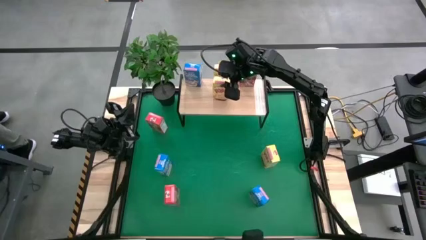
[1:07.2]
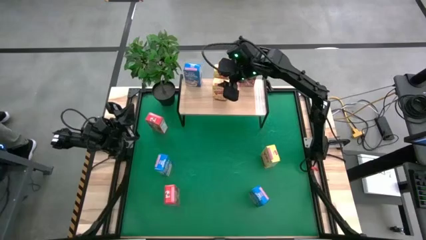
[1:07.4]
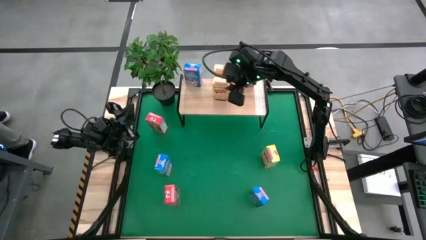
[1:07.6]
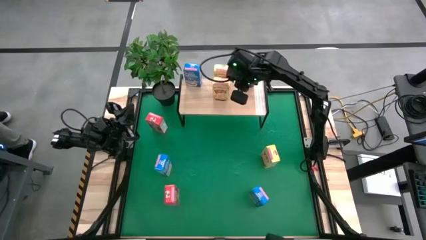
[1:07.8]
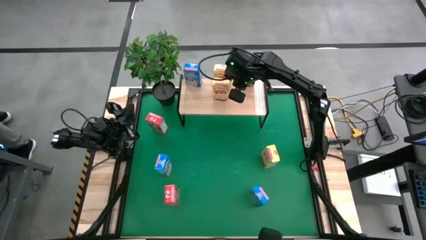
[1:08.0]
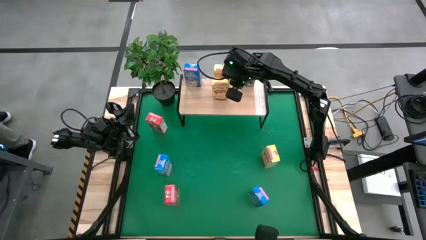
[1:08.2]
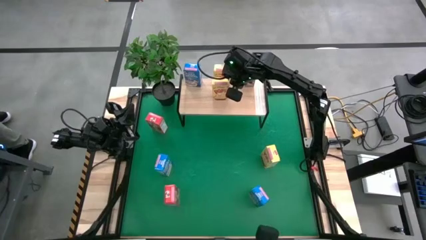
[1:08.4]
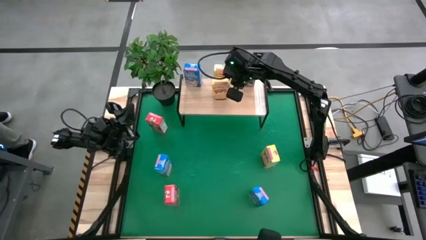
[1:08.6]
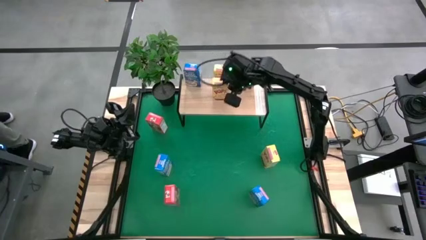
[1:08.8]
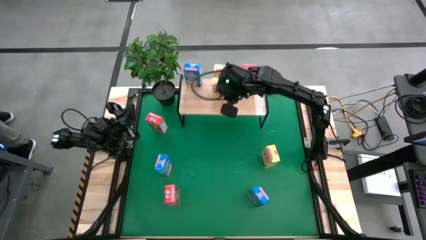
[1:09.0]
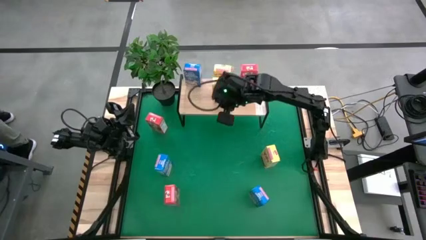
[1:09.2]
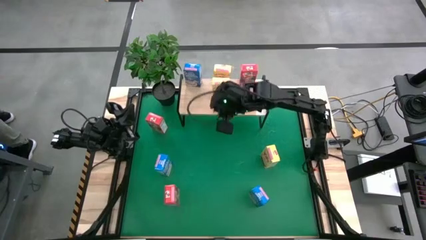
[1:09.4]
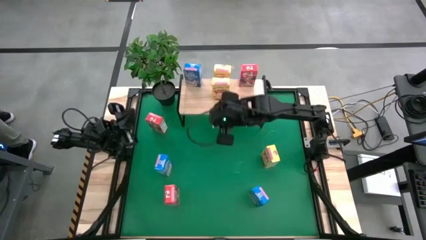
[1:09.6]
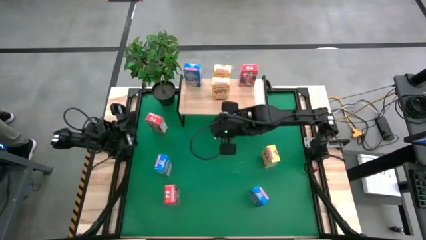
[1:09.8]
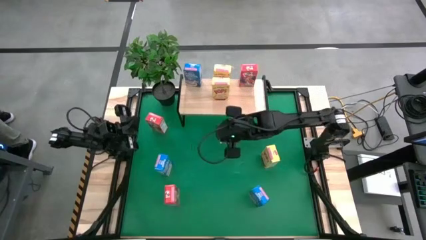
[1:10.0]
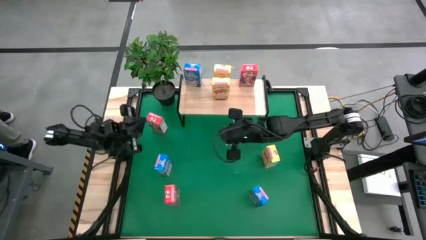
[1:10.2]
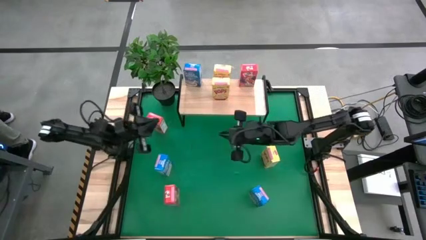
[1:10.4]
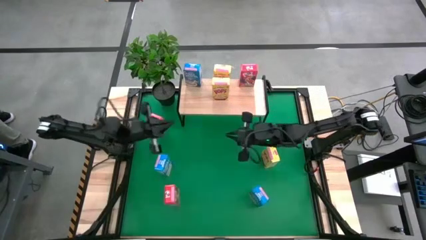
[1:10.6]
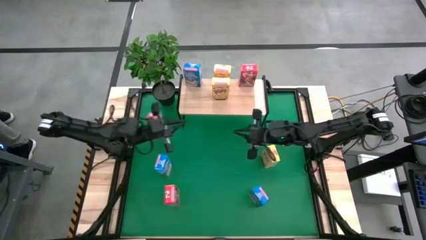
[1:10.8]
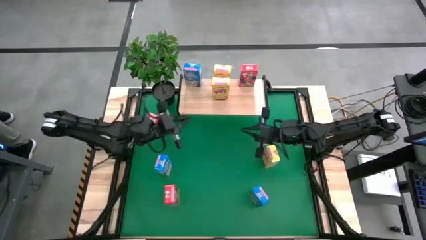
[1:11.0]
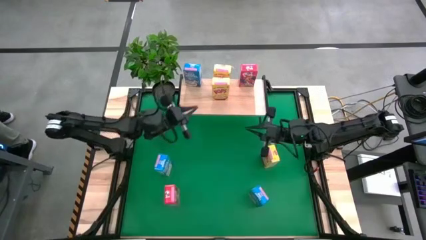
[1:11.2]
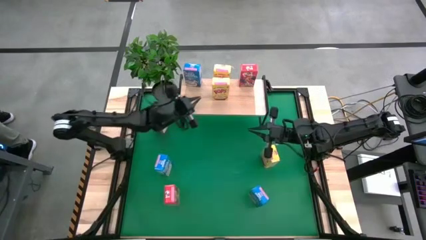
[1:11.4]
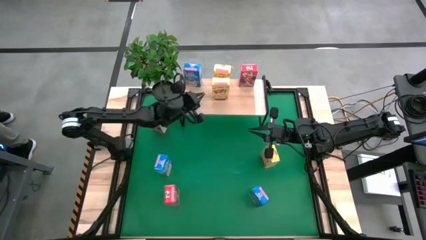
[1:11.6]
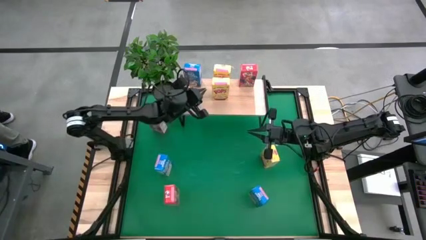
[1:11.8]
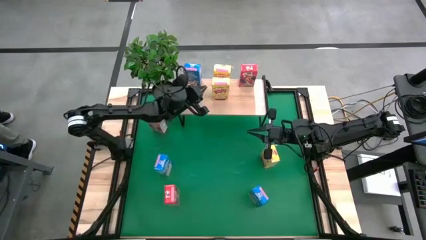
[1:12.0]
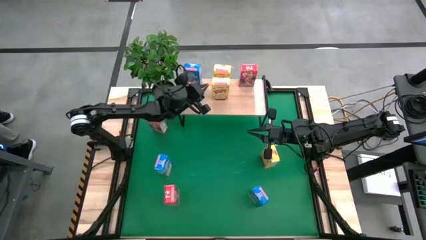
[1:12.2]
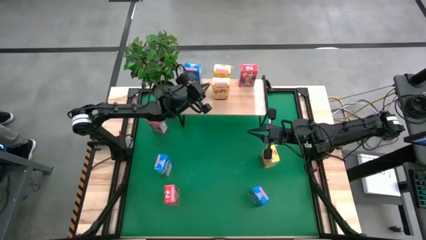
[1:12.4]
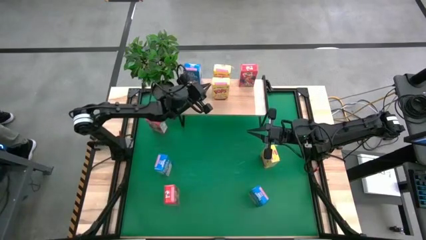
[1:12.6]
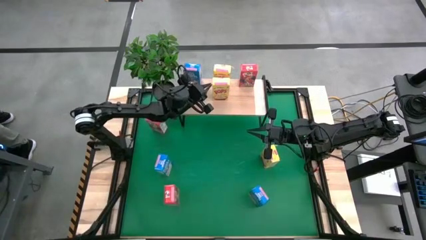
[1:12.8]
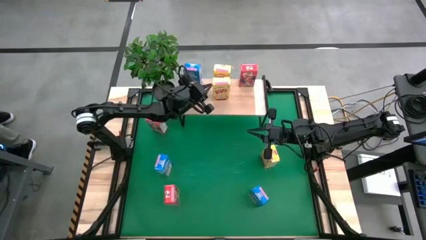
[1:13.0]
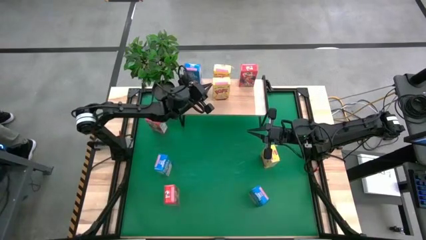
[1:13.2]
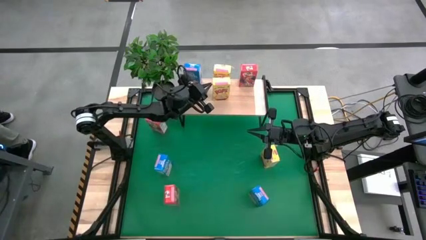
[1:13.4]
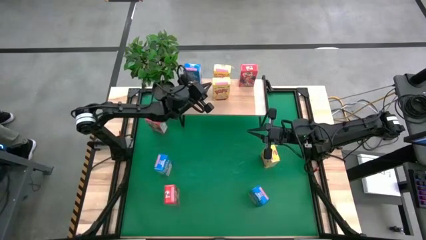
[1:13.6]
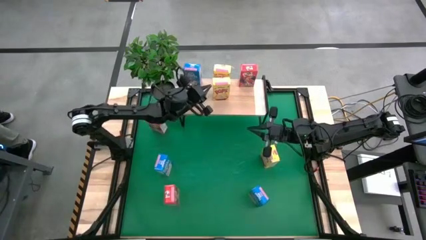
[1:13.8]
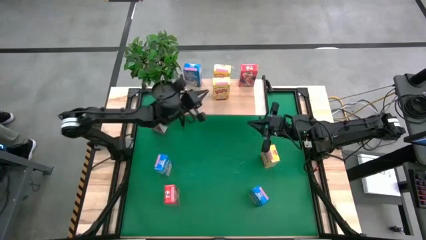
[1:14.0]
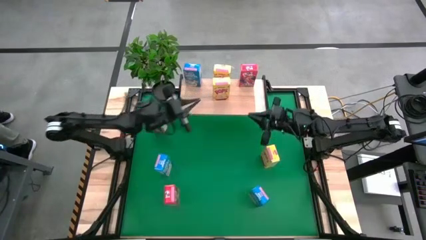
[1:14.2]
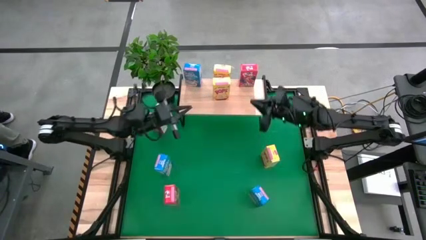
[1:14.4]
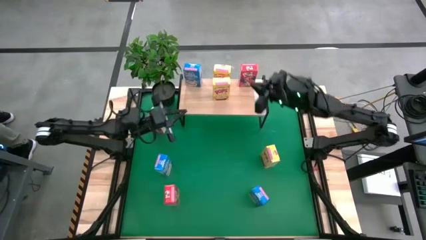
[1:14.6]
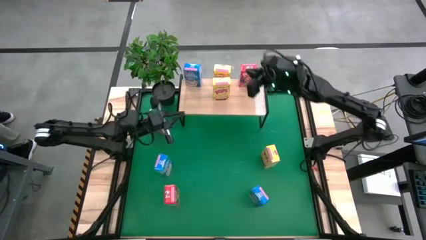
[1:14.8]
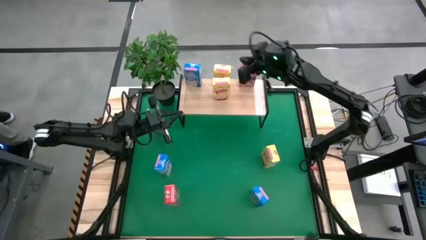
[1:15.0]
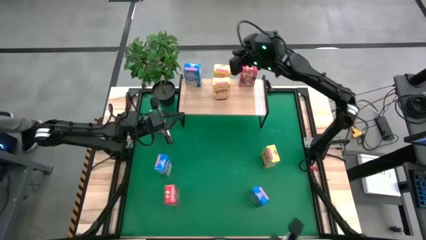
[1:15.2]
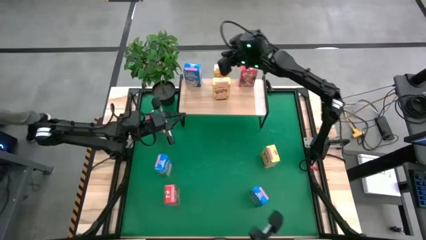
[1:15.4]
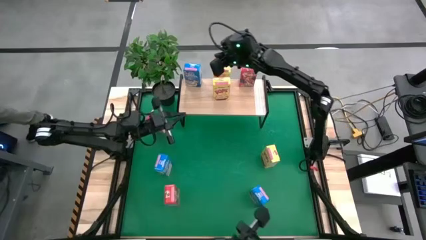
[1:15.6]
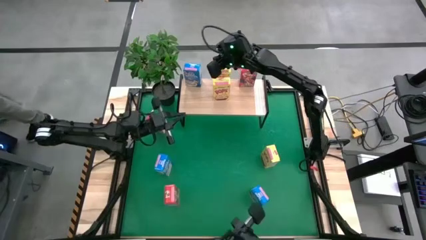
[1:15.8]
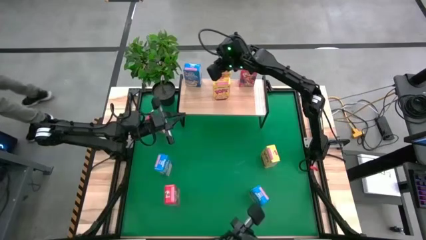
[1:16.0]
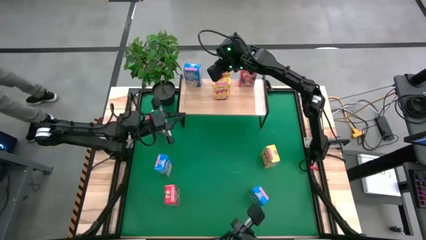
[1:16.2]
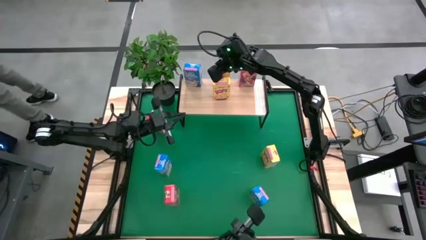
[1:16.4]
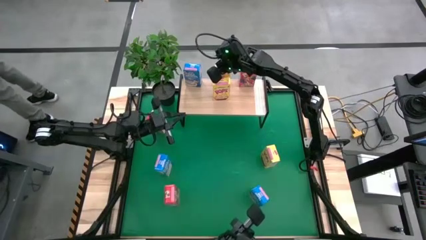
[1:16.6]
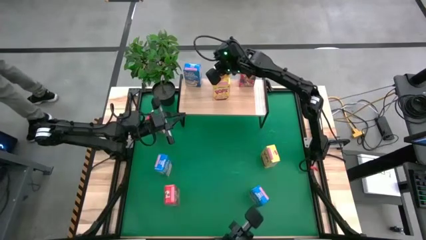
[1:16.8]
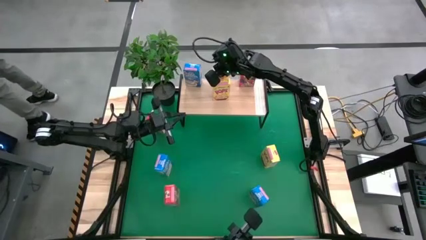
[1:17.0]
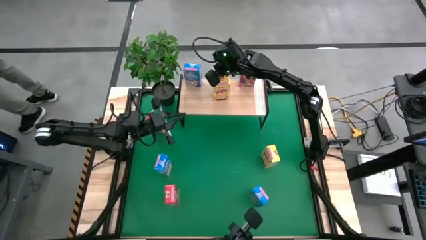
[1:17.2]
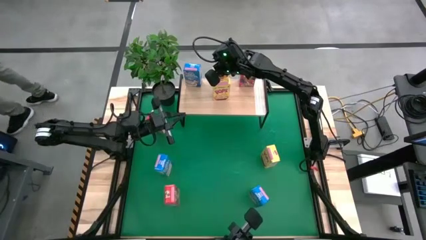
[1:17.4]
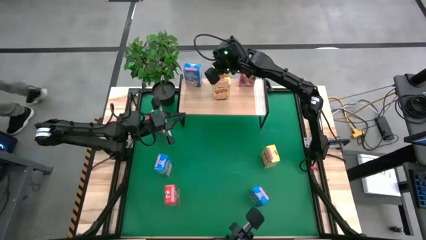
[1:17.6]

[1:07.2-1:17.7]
Task: Stack cereal on shelf
Put the left yellow cereal box on the shelf

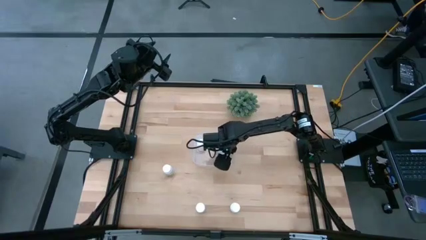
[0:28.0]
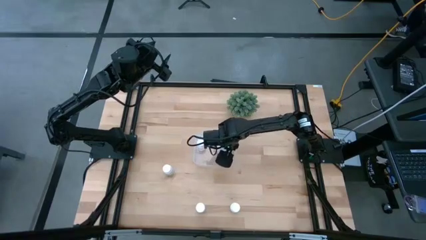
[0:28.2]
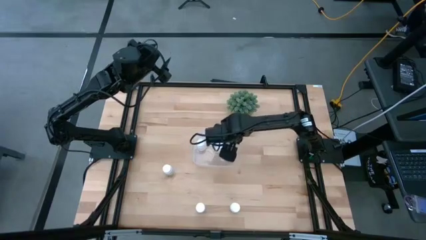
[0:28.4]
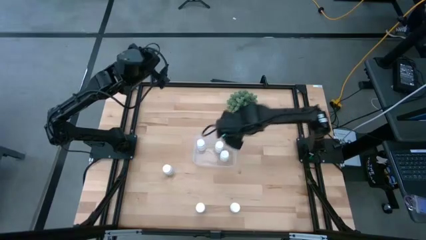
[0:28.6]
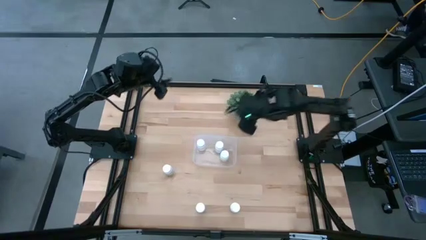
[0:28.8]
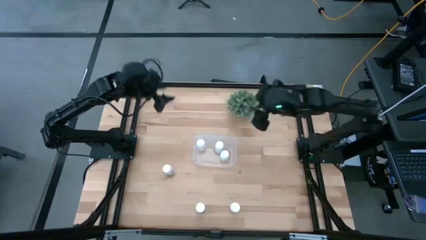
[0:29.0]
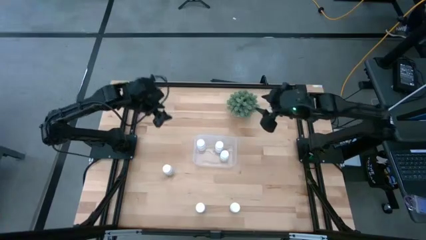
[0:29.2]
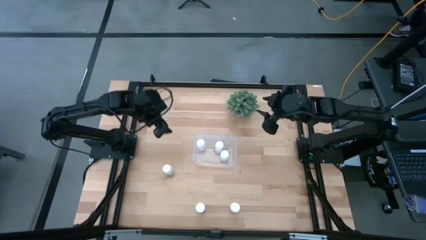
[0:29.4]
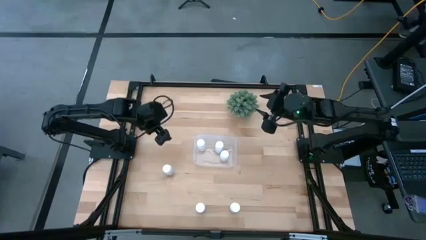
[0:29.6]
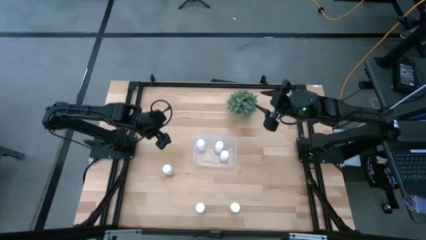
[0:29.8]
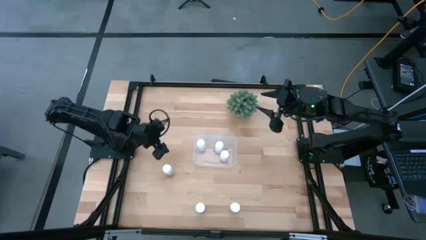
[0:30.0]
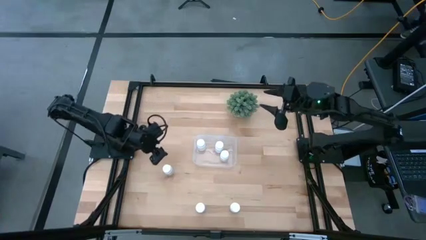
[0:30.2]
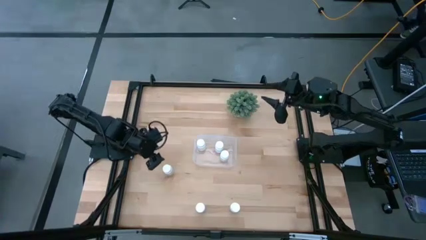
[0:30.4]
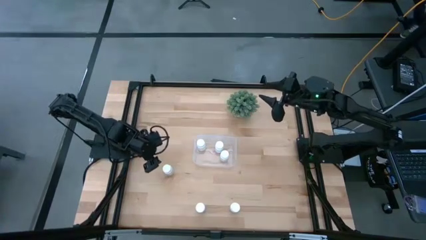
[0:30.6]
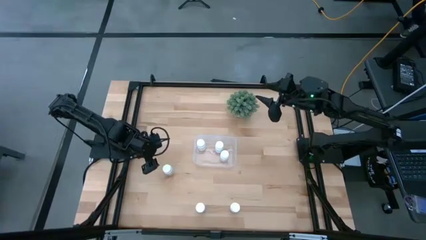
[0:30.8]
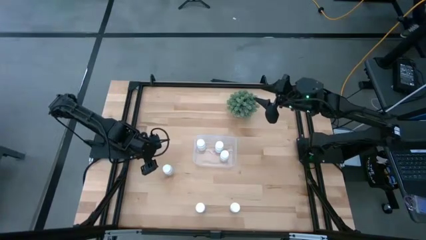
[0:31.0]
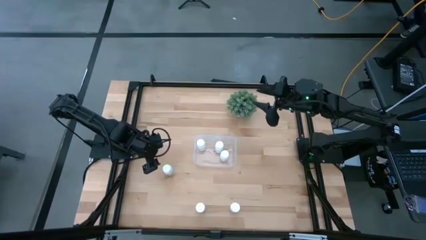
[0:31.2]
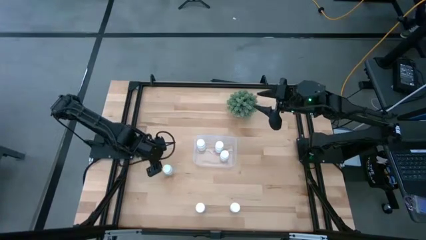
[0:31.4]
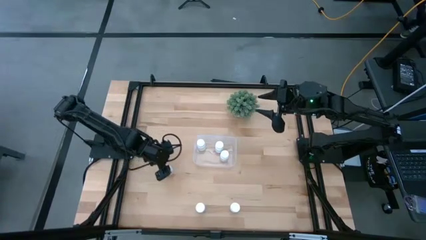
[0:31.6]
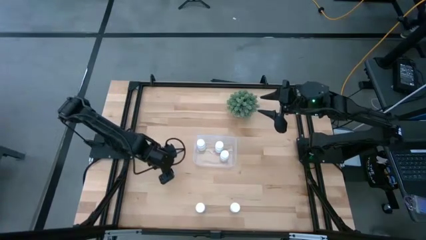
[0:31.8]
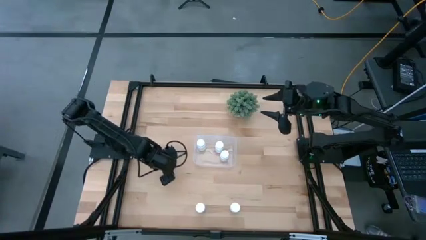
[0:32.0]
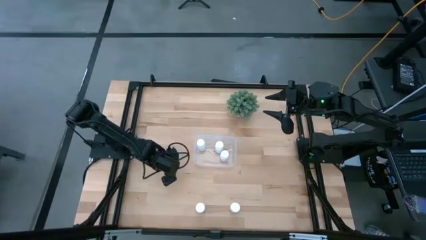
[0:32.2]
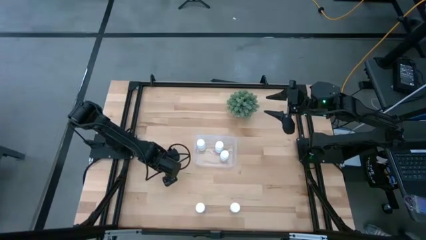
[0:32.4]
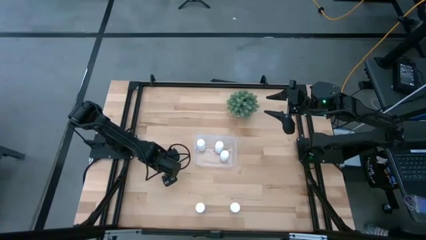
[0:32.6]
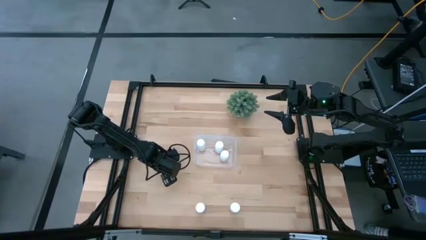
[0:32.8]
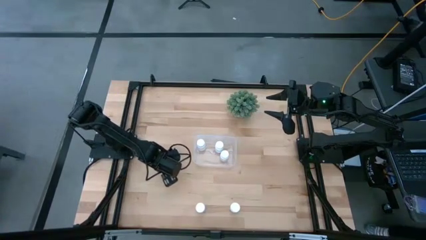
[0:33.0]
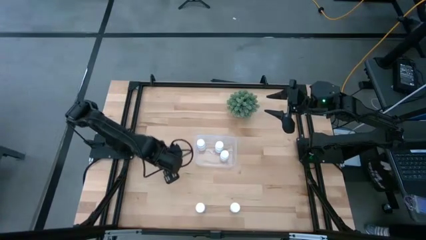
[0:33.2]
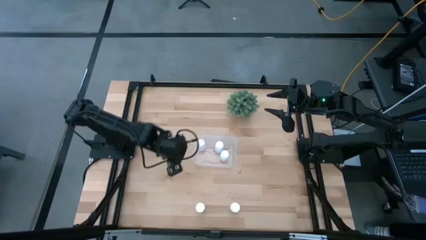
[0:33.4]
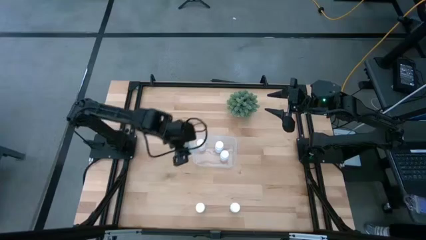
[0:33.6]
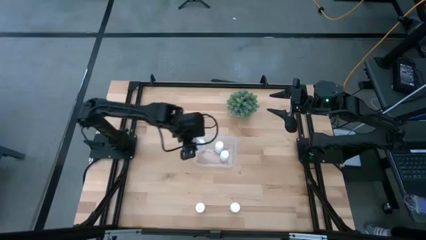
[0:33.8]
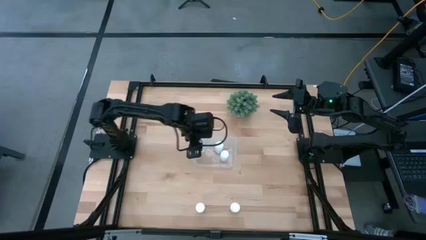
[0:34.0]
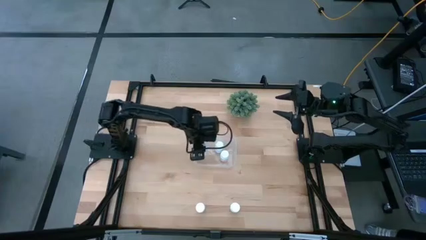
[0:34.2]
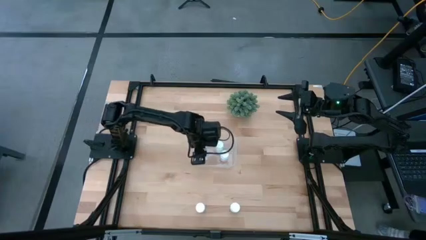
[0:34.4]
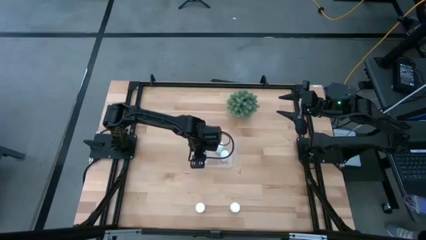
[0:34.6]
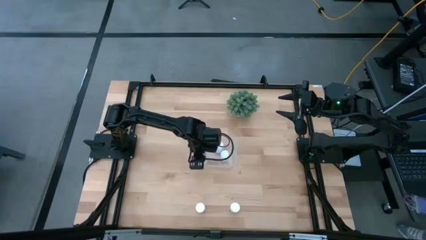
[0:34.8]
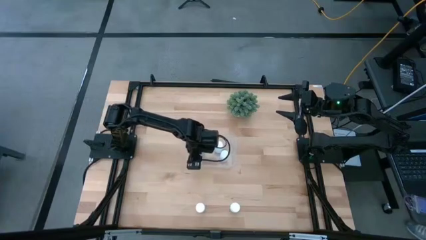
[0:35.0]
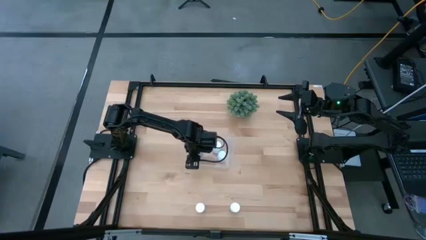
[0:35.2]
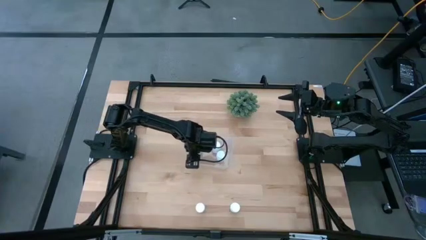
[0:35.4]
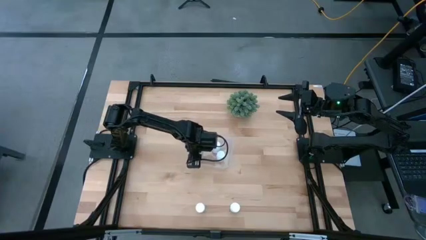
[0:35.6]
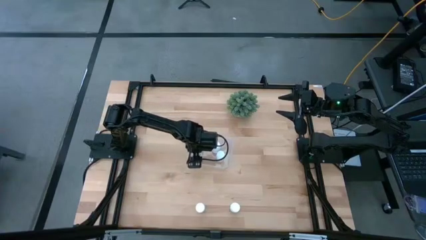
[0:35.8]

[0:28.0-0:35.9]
Task: Pick and place pill bottles into a basket
Put the white pill bottle into the transparent bin
